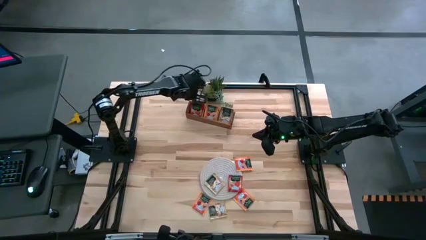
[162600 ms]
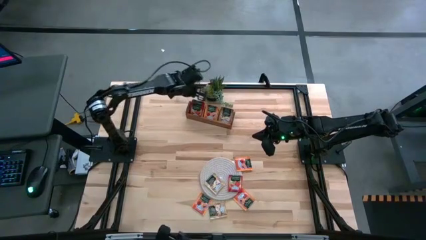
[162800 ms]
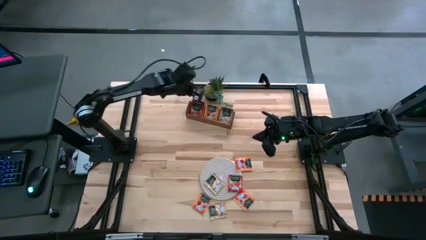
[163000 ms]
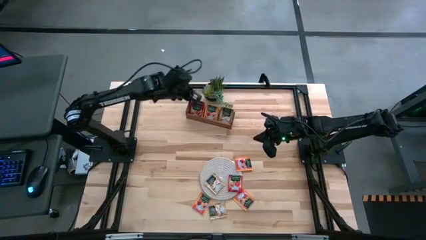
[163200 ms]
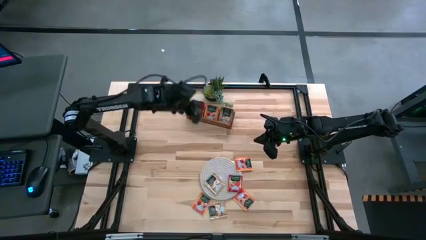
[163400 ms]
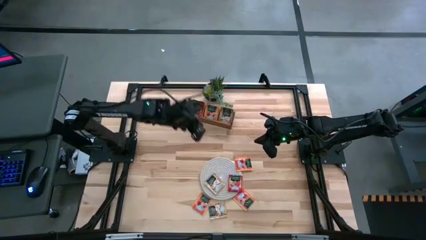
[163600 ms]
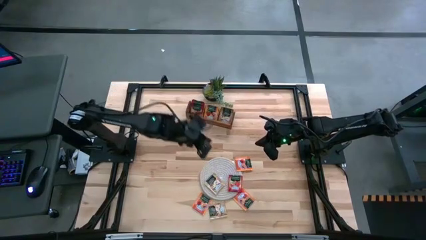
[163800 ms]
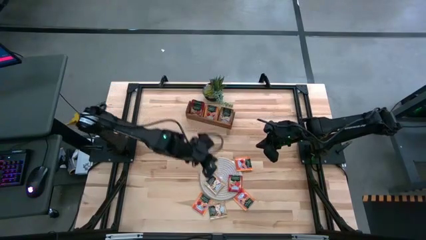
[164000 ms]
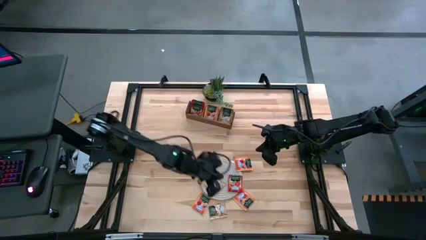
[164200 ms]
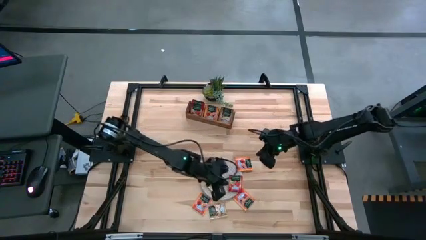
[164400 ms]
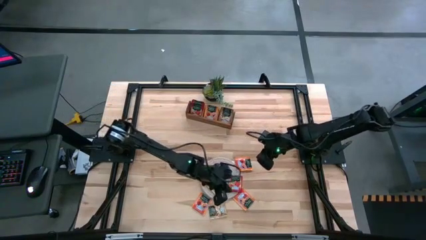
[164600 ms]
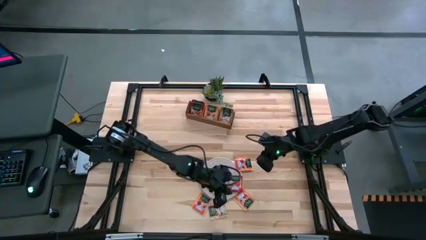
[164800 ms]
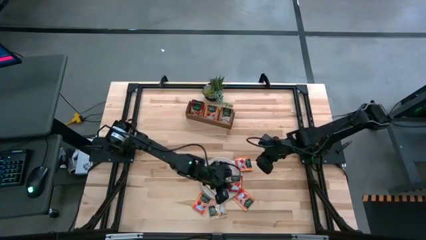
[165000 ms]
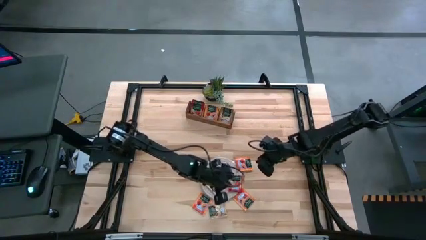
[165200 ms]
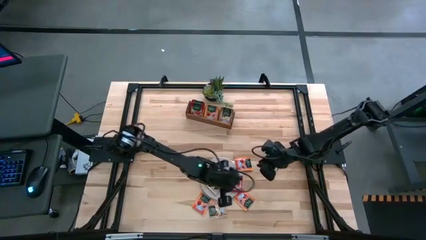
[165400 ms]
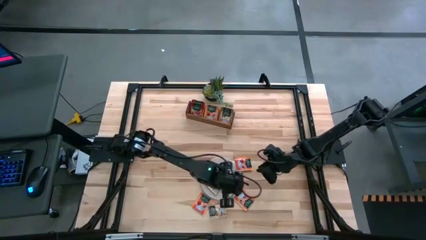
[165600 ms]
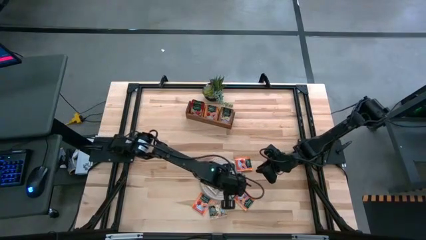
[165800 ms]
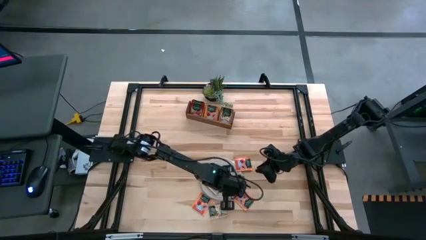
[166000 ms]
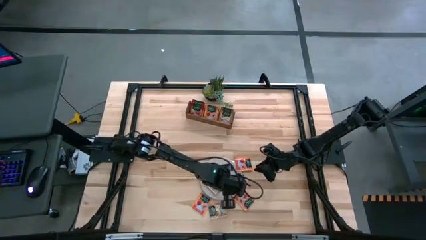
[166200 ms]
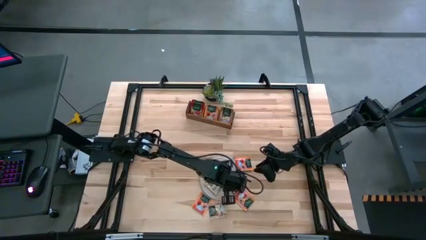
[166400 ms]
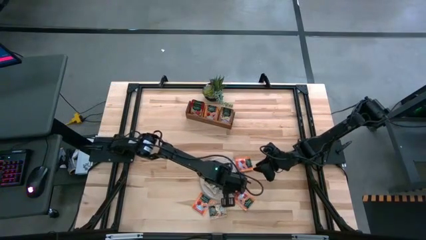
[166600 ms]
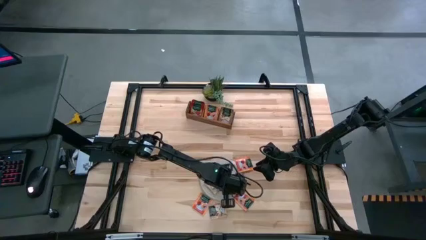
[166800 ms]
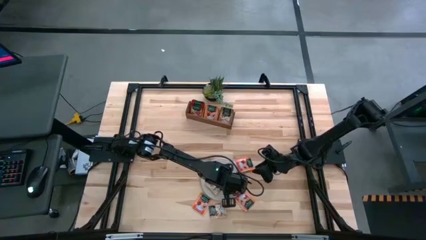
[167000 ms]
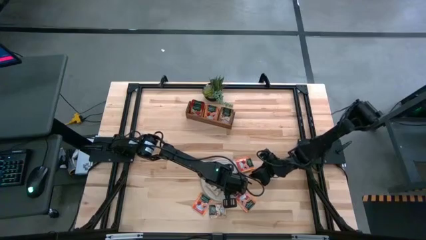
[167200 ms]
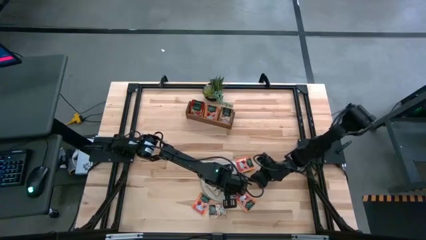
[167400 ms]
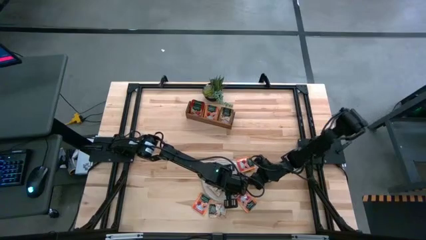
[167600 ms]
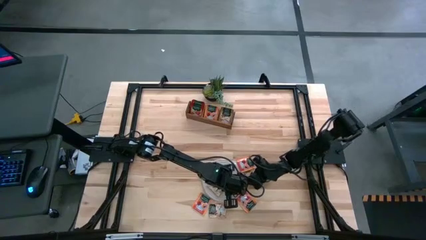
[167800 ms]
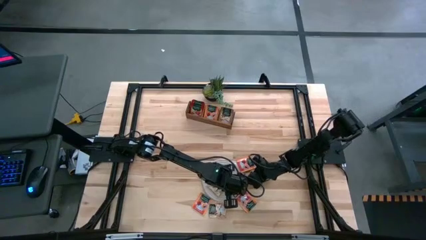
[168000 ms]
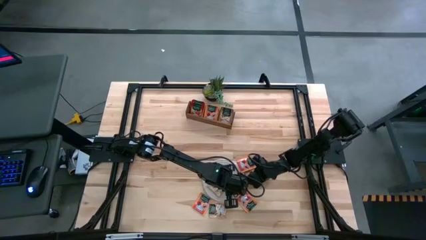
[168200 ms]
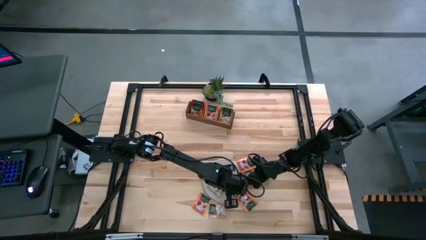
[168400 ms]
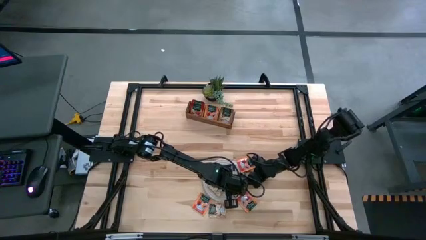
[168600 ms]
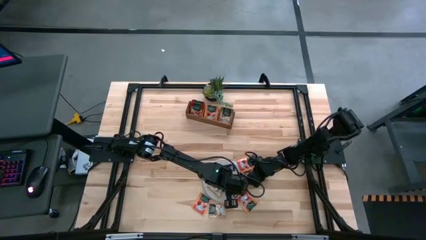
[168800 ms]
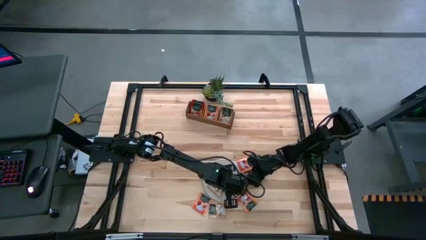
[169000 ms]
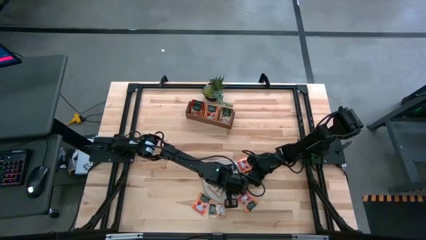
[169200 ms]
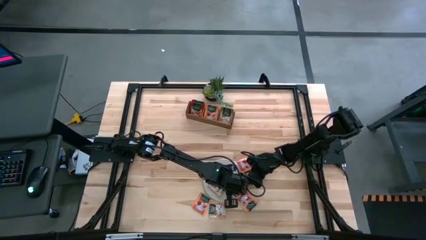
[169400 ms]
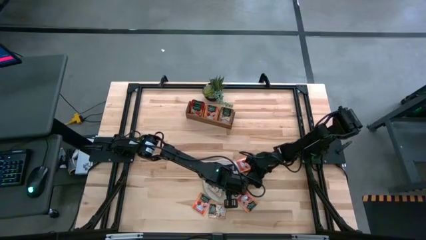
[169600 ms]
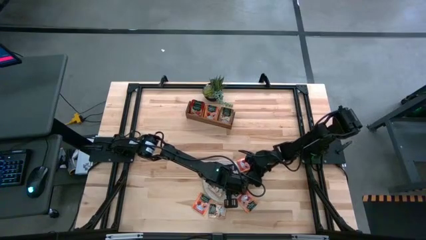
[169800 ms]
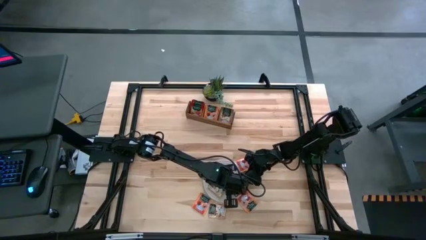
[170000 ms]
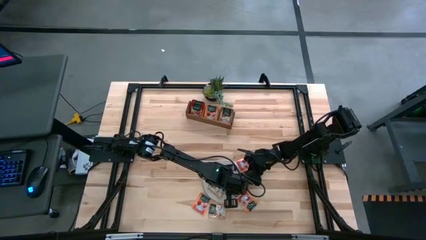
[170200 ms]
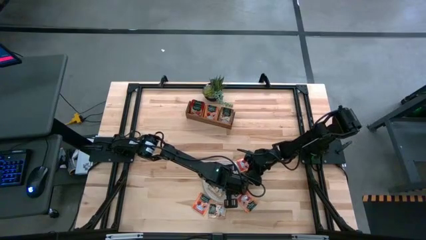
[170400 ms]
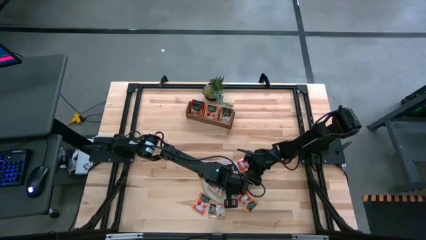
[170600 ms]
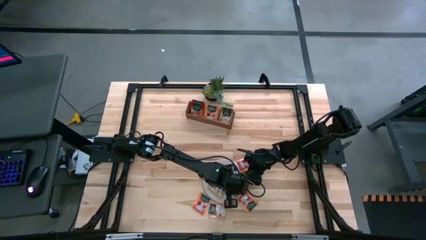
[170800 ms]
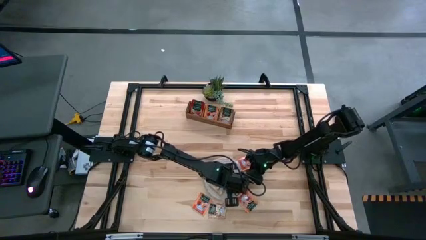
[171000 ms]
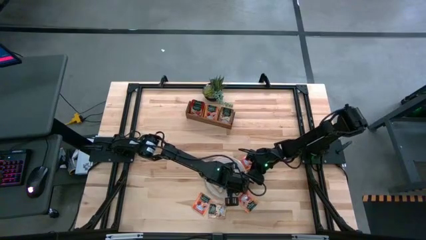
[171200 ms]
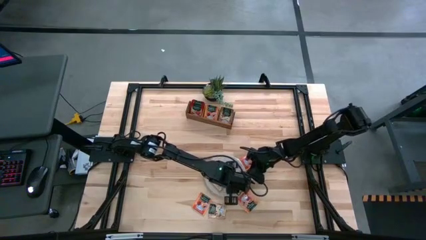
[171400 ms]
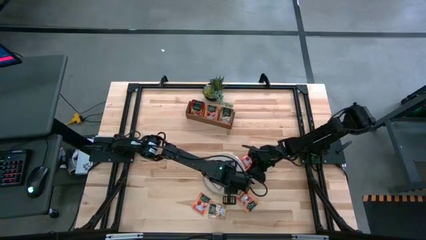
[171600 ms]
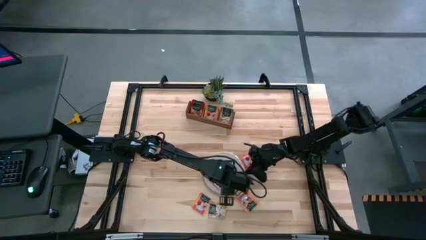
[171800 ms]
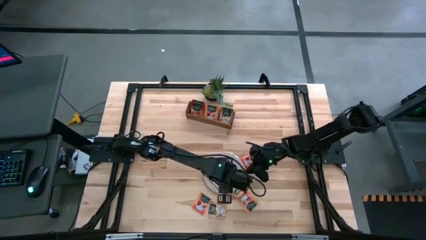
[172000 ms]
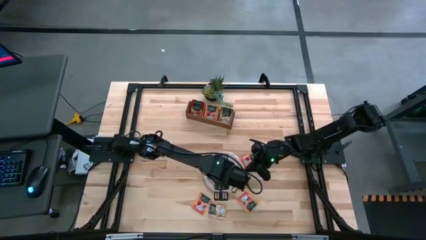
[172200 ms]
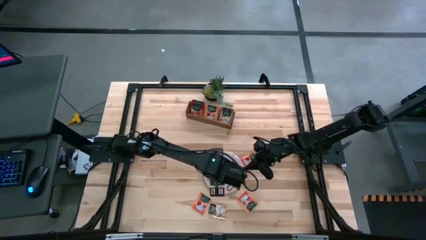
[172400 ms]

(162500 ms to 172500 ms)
Task: Pick & Place Tea
Put the red tea bag into the left section of the wooden organizer

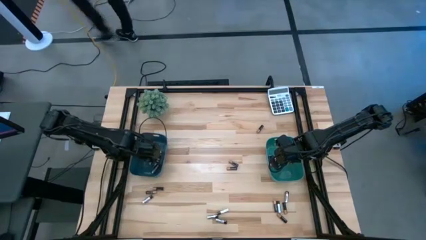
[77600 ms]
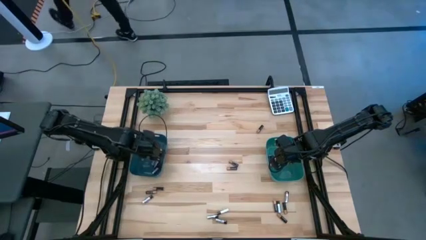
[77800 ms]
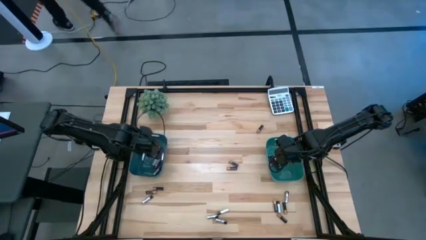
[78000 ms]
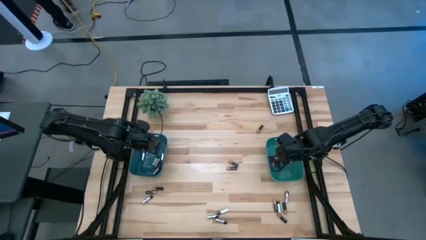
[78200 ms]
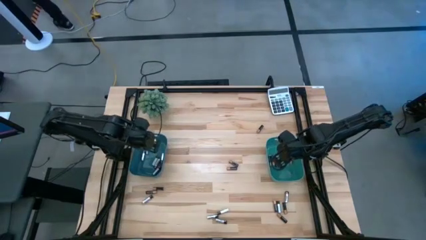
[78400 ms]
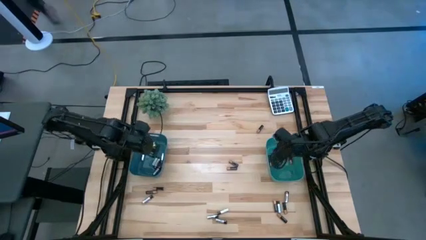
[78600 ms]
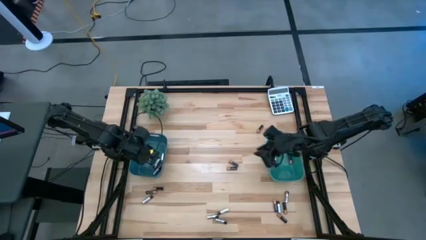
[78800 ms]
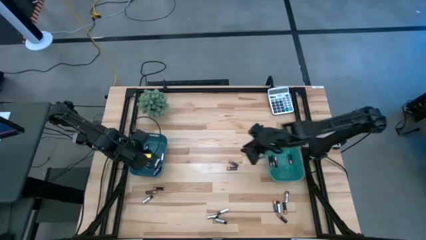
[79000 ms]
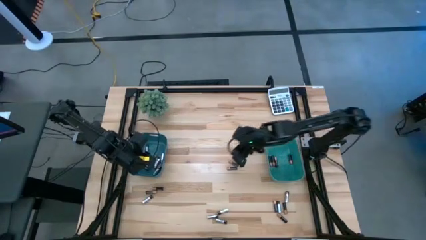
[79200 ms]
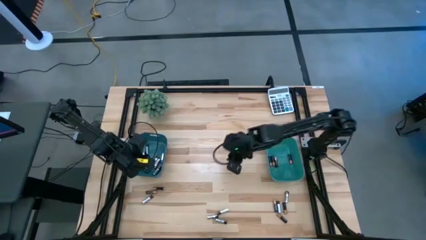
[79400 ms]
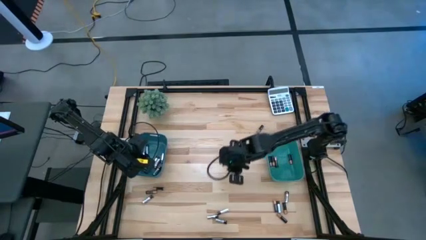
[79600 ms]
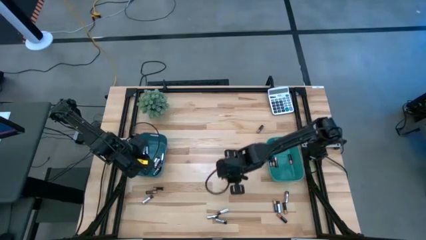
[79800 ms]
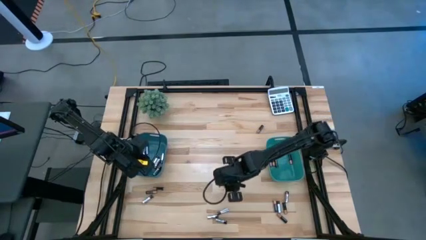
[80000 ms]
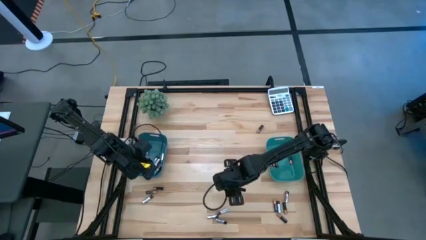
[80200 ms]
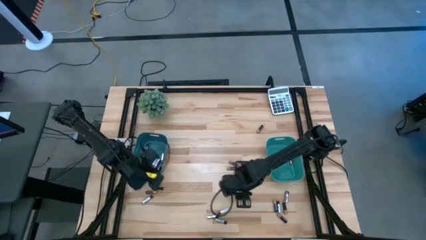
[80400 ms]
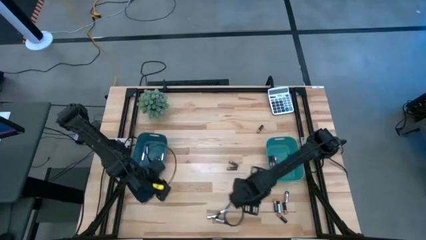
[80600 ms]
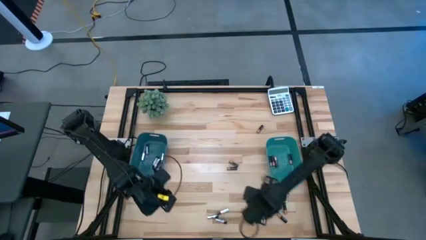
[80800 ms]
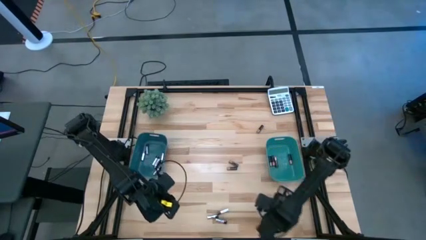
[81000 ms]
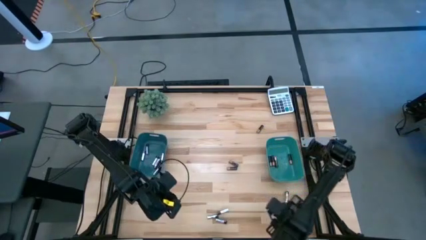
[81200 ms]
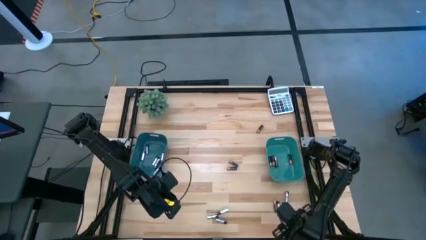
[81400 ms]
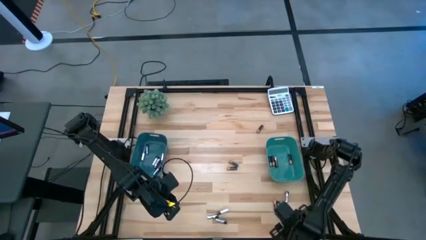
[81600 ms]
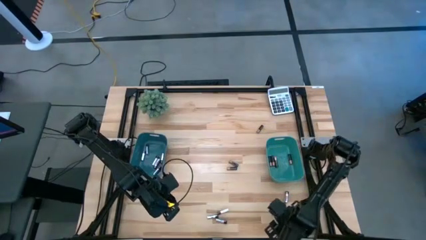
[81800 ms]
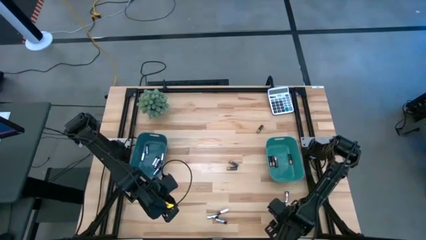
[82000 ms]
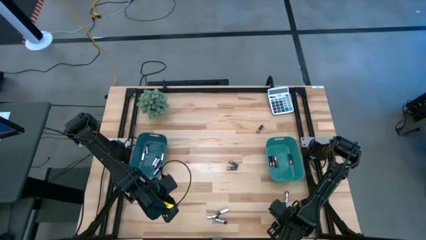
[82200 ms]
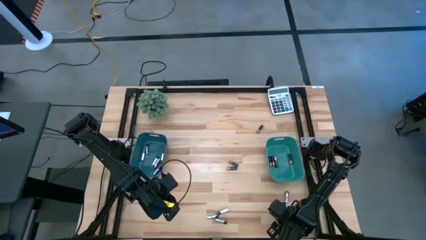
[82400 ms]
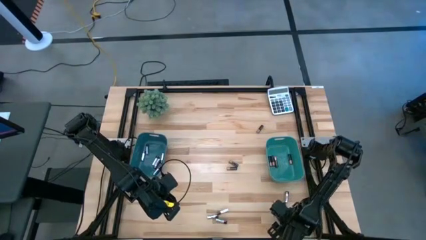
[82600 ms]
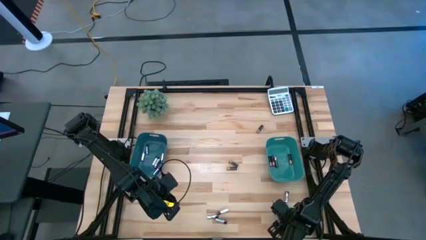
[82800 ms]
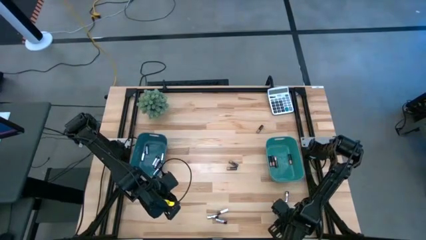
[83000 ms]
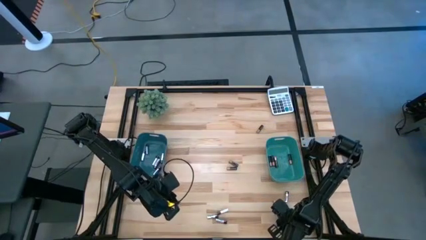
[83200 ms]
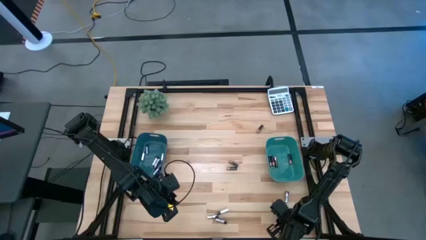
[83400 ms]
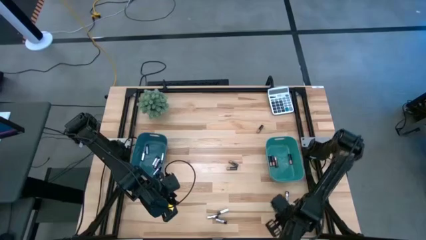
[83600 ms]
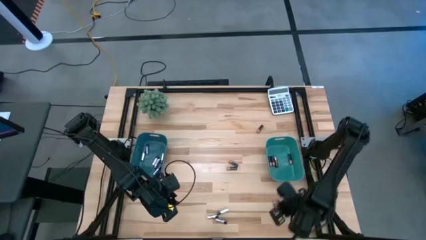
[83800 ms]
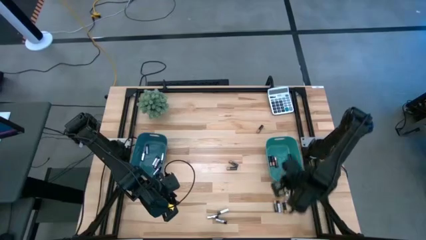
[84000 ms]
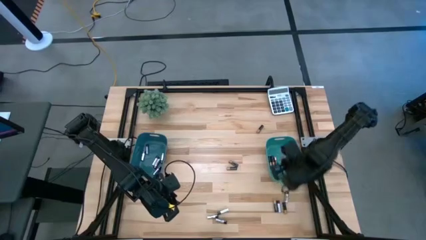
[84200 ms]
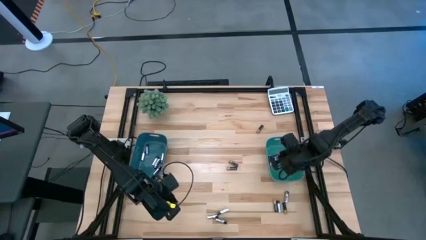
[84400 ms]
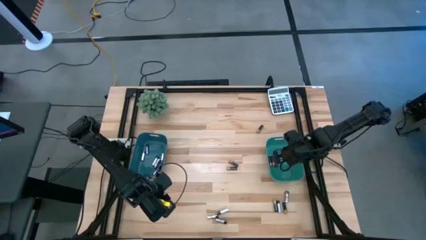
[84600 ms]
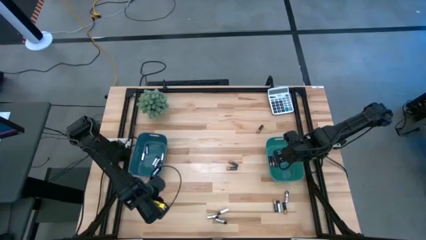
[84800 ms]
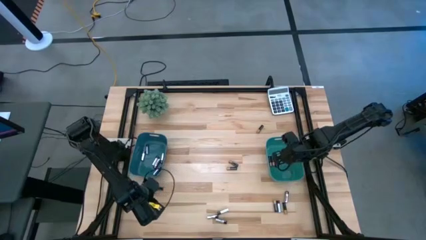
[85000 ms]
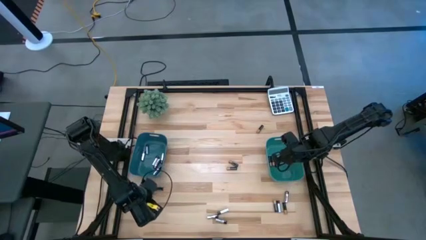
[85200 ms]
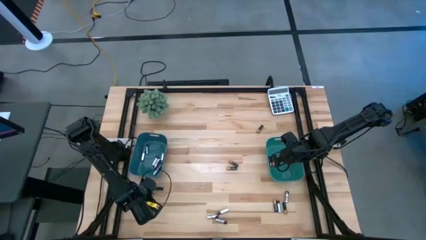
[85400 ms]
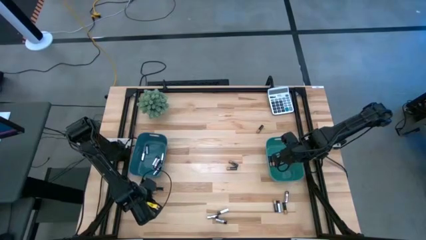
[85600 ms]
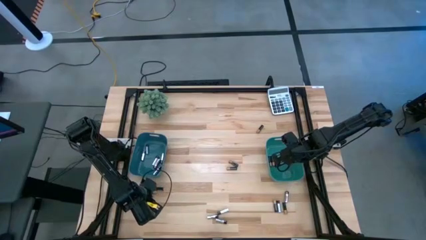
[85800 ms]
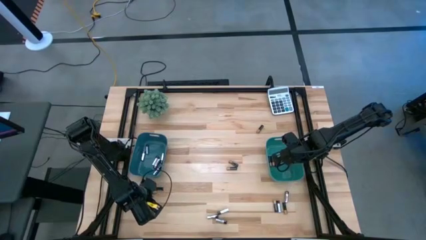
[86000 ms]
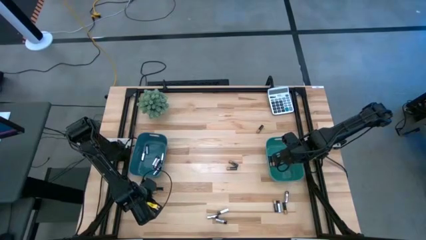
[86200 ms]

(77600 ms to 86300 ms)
Task: Sort batteries
Put the black battery into the green bin
